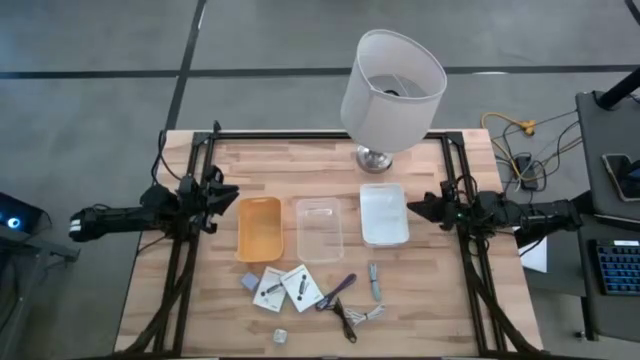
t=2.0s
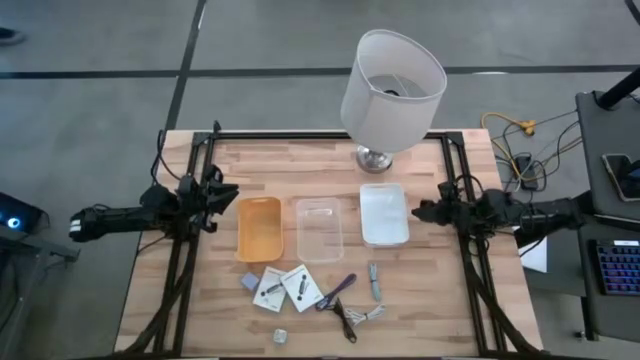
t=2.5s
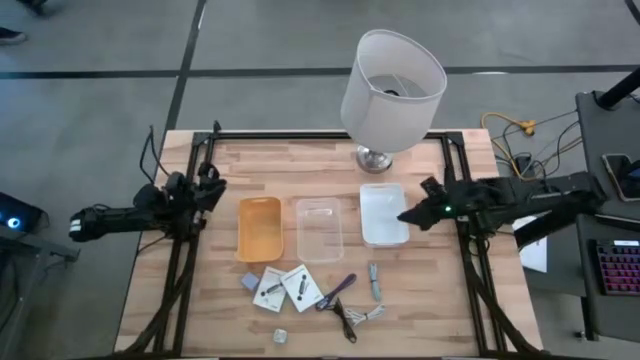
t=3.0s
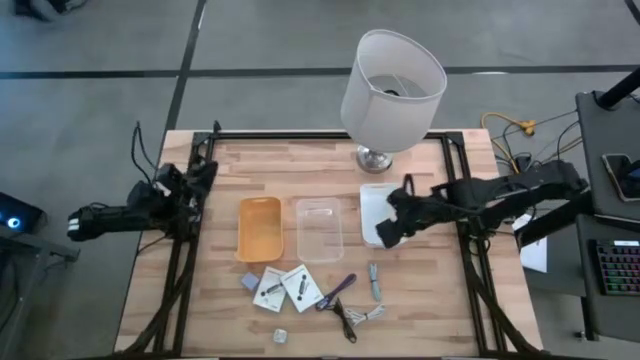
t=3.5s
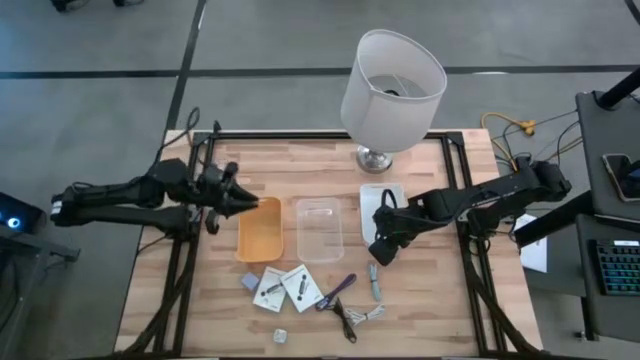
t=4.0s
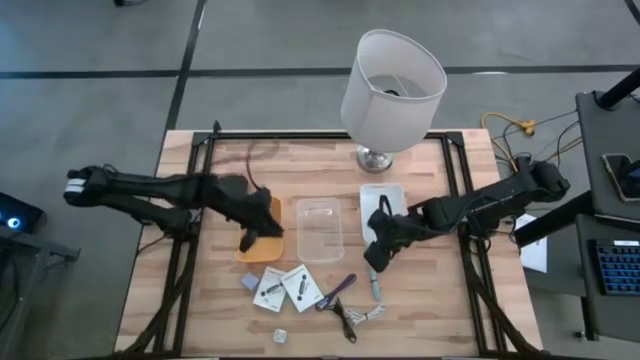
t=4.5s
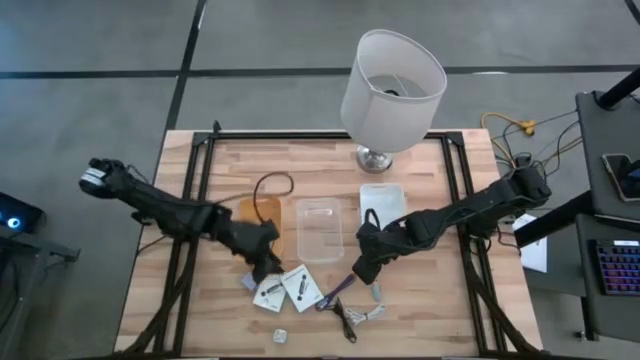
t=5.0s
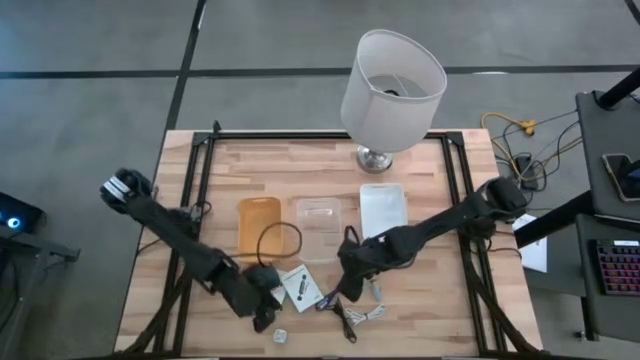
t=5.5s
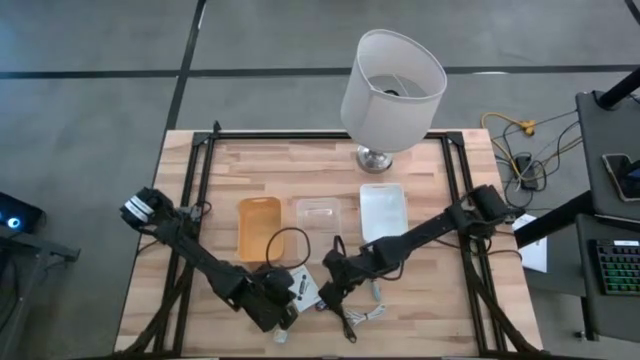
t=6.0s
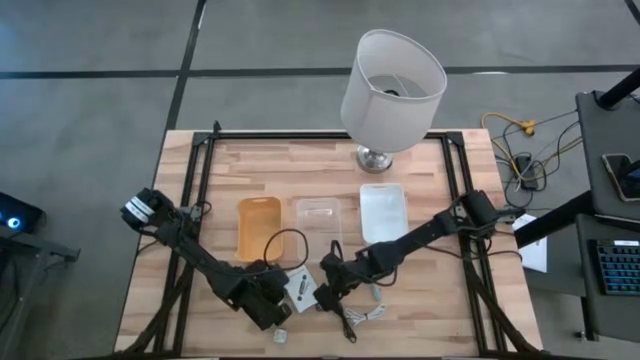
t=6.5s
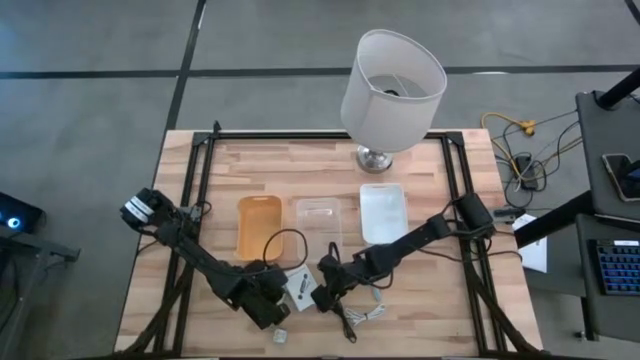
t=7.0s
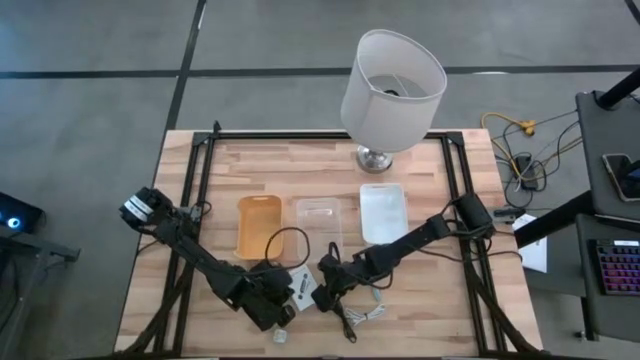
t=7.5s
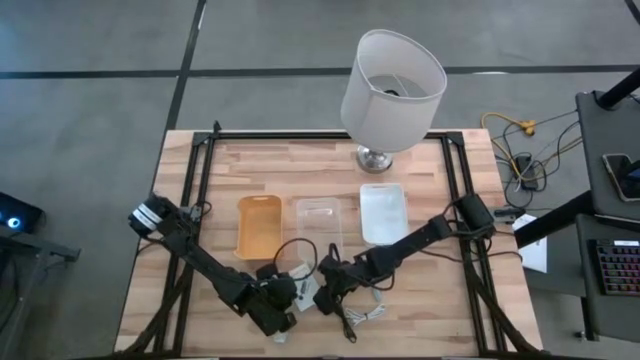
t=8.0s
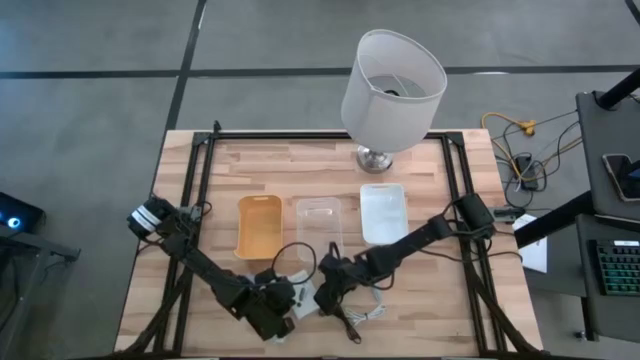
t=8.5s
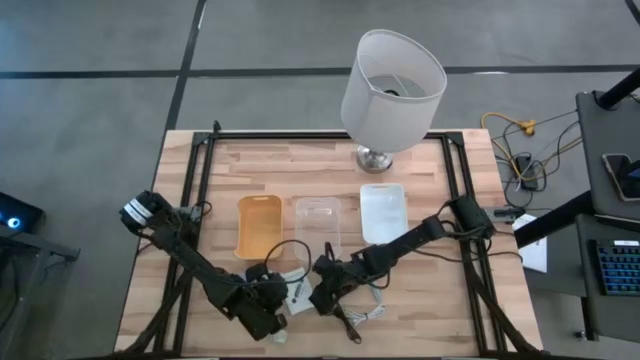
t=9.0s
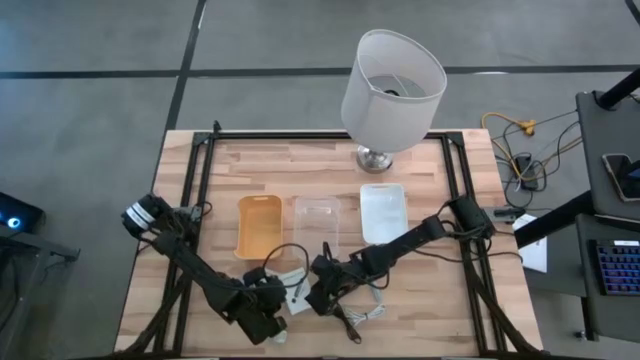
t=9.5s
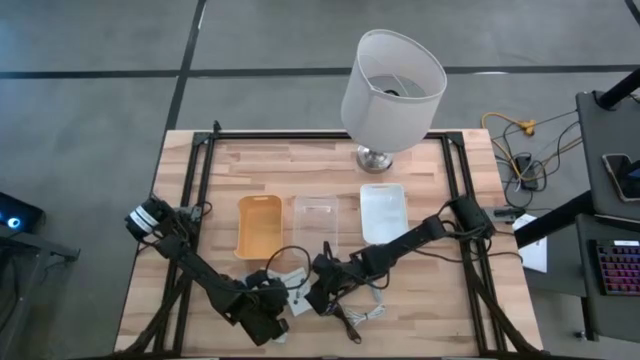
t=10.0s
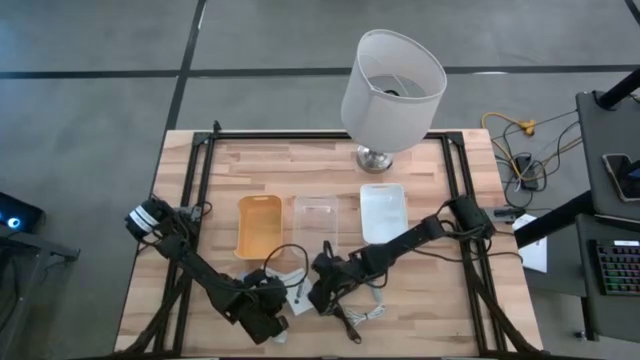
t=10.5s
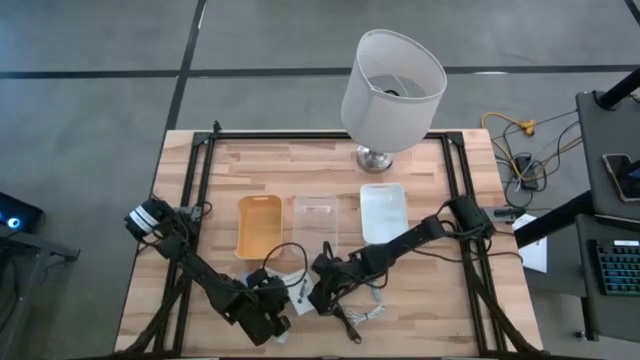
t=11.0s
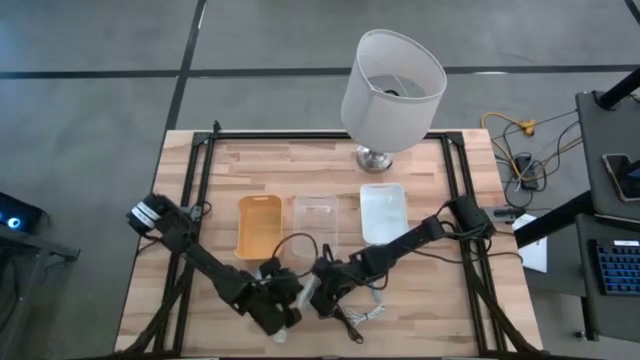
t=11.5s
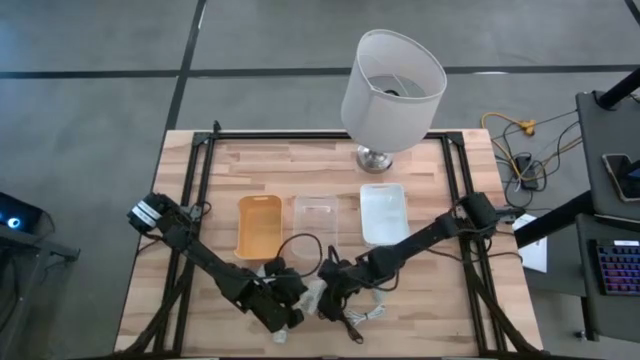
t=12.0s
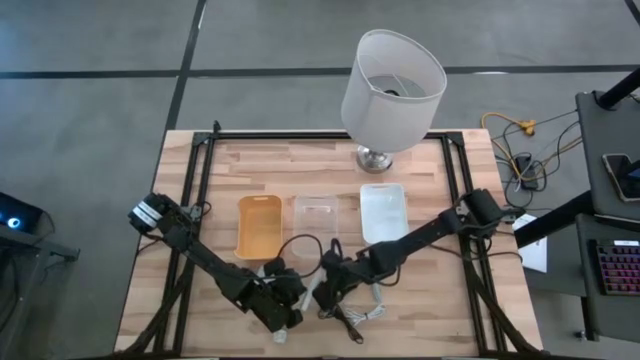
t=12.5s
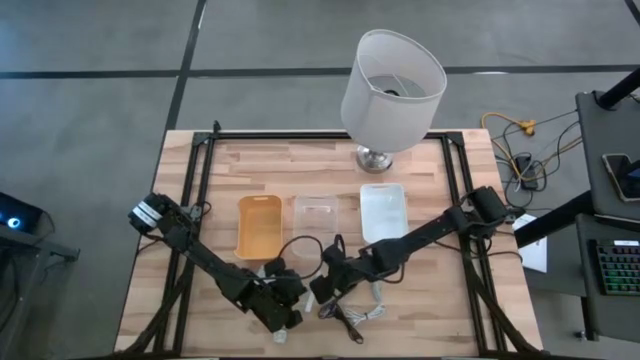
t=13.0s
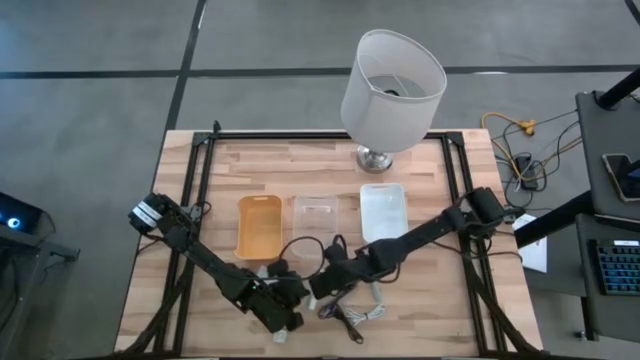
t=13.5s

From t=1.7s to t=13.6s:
Task: Pick and place items into bin
Put the right card reader box into the white bin

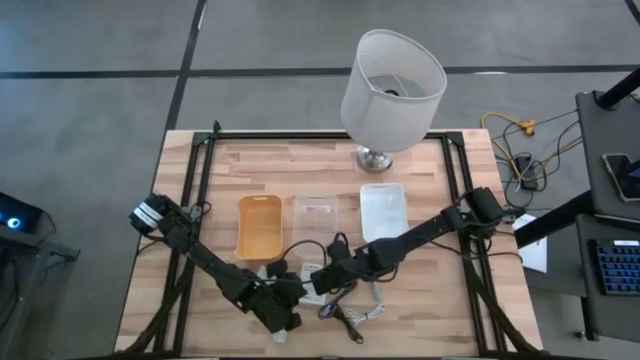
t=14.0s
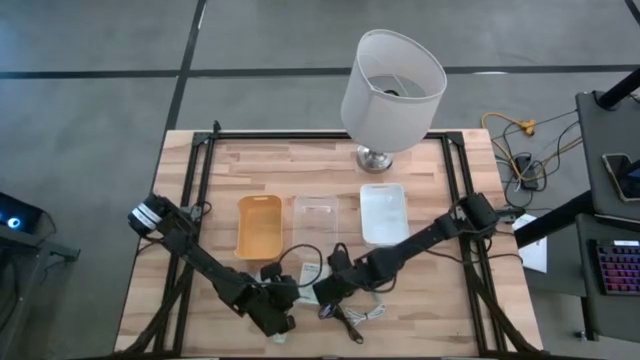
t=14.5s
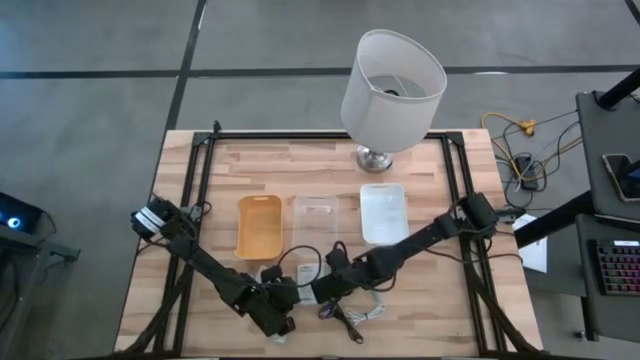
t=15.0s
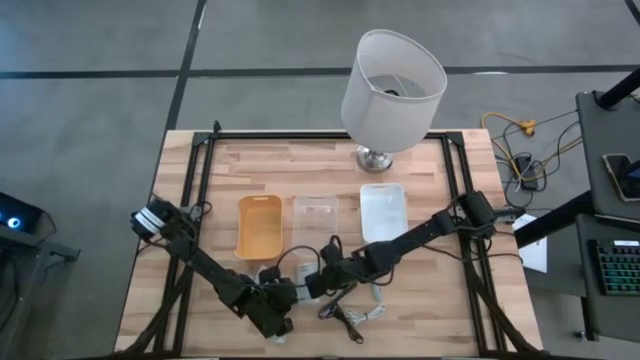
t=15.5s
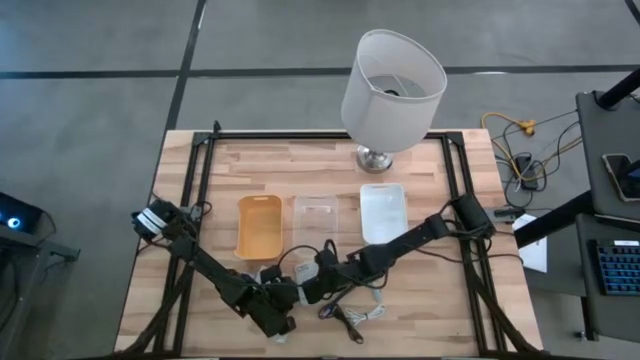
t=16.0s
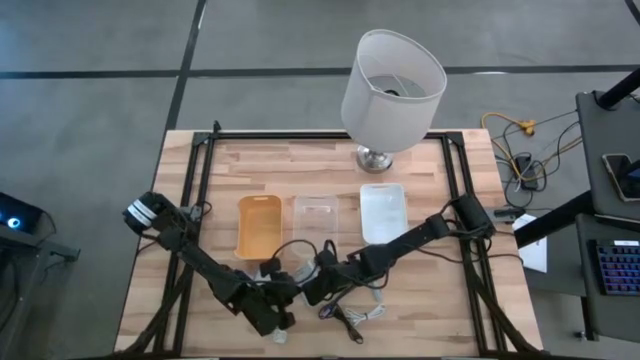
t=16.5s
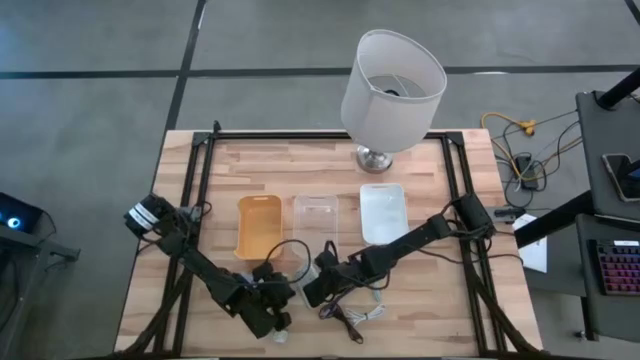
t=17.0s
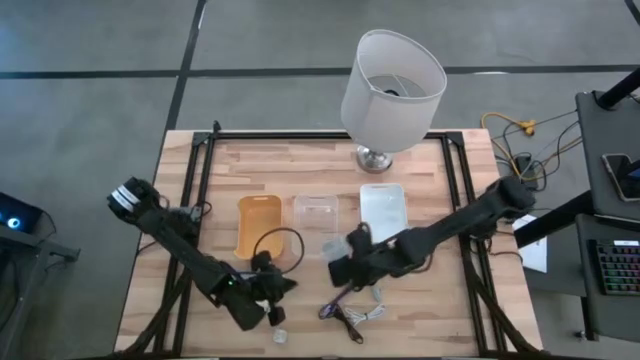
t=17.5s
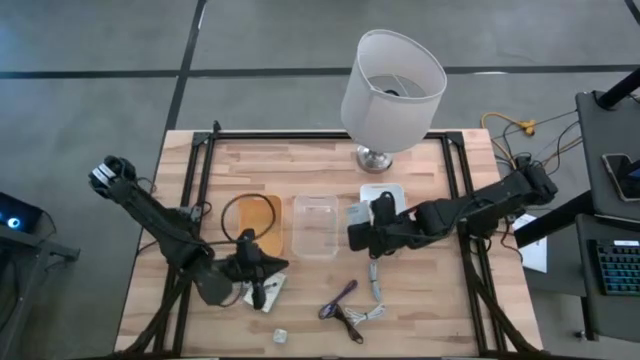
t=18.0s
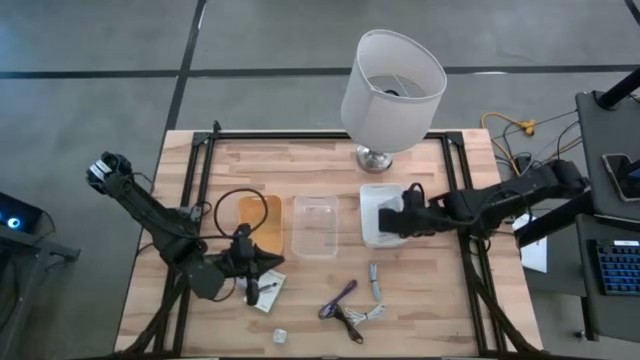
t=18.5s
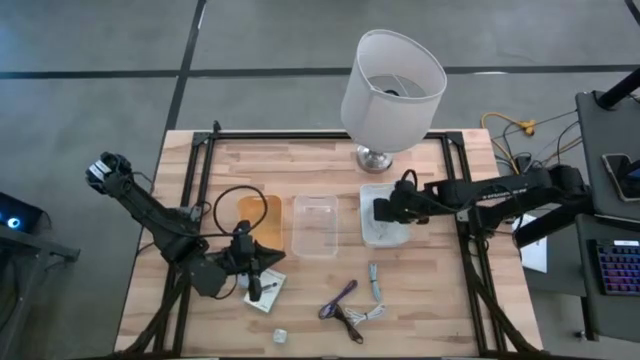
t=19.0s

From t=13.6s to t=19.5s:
Put the right card reader box into the white bin

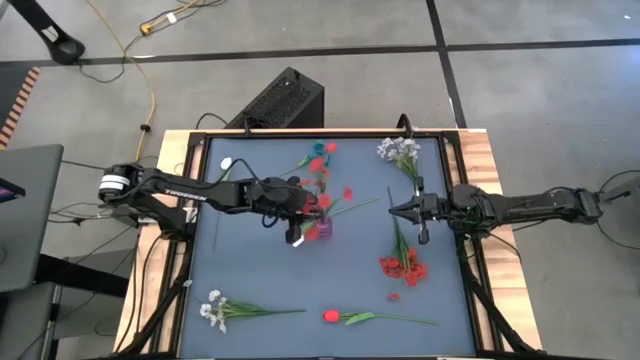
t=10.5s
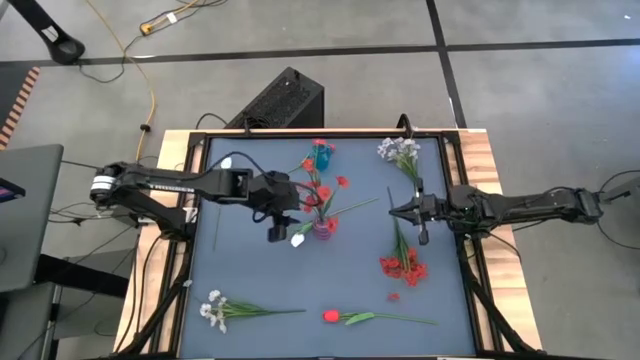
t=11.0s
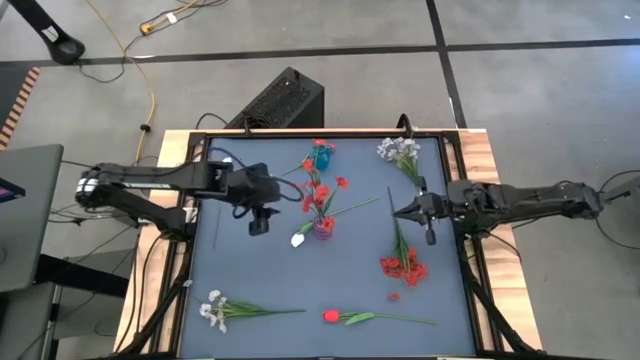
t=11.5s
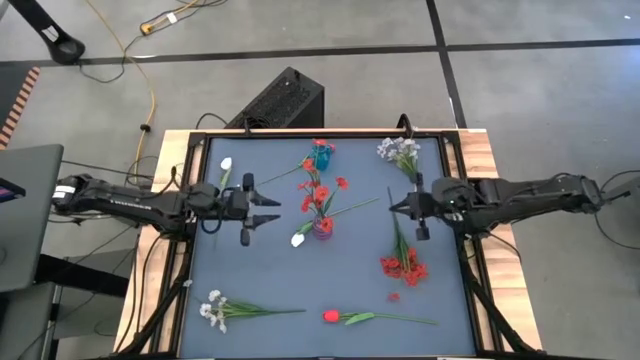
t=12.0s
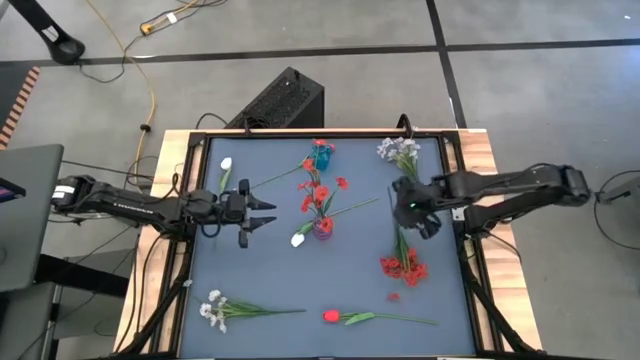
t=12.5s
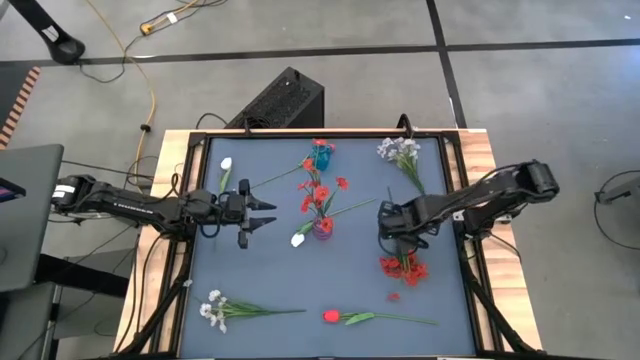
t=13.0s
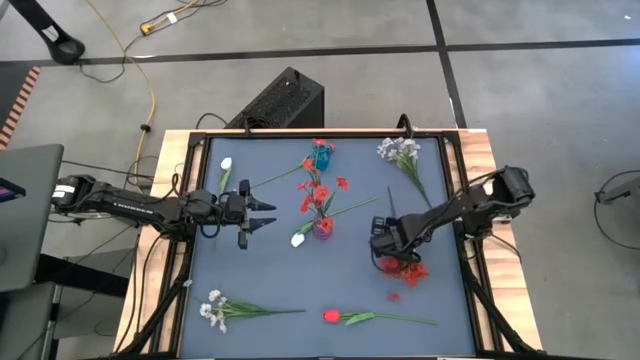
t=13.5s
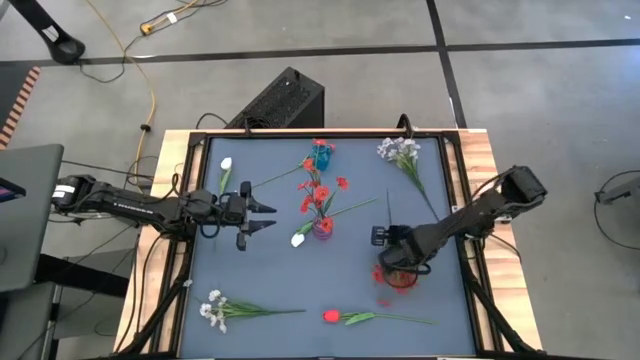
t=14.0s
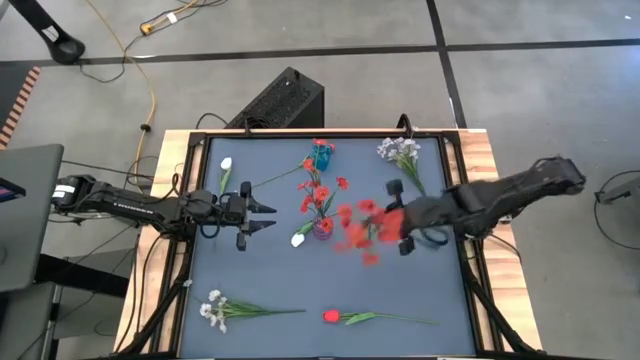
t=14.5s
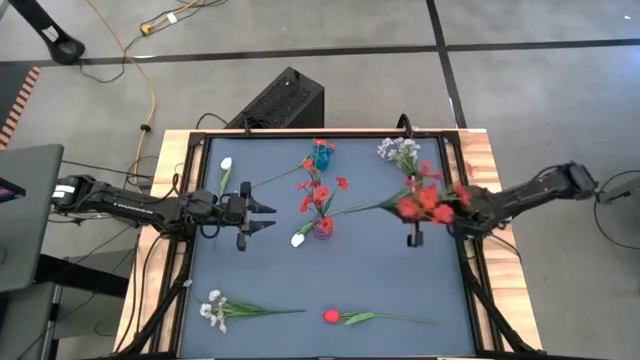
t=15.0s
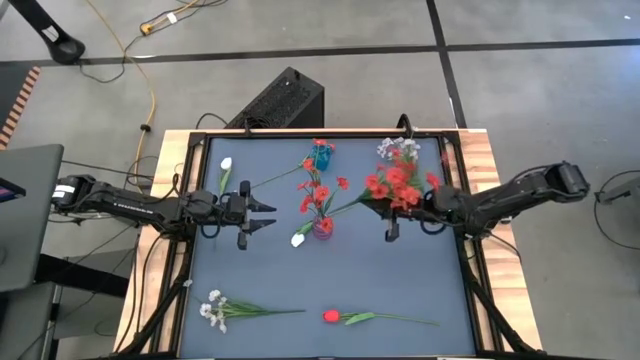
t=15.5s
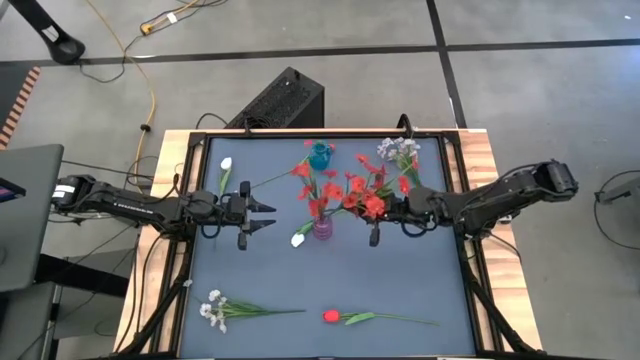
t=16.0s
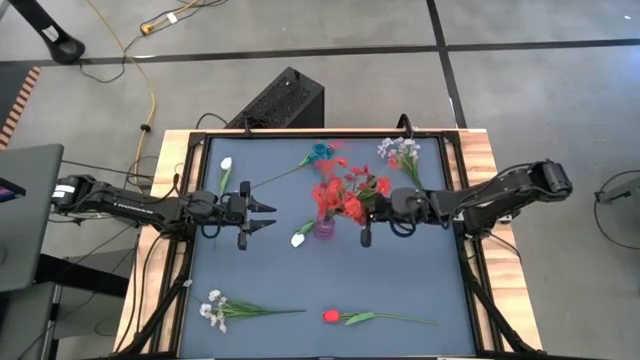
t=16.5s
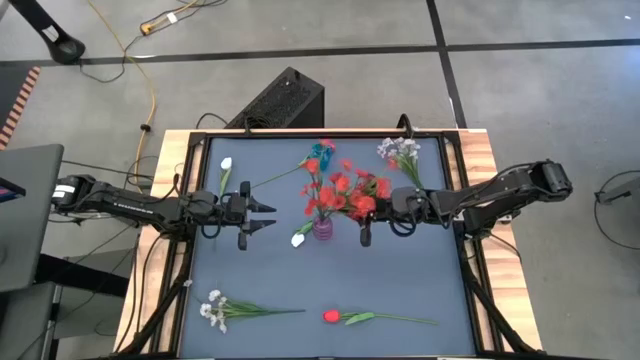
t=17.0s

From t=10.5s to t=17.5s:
Task: Sort flowers into vase by color
Put the orange flowers into the violet vase
